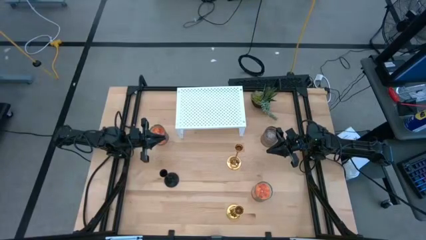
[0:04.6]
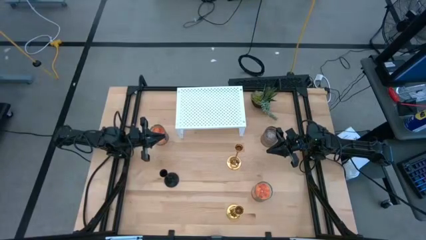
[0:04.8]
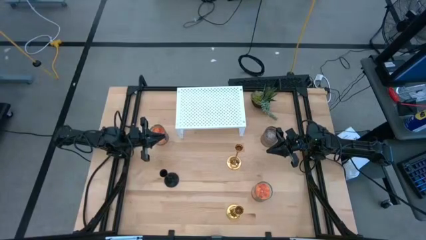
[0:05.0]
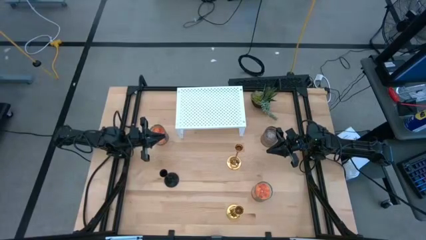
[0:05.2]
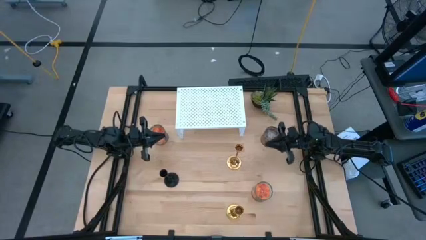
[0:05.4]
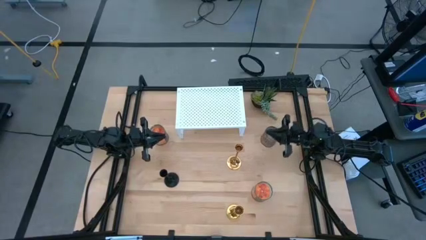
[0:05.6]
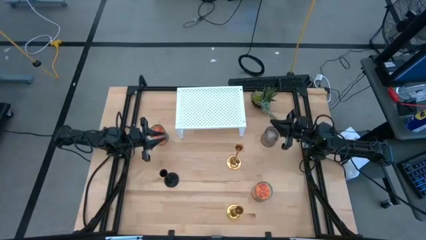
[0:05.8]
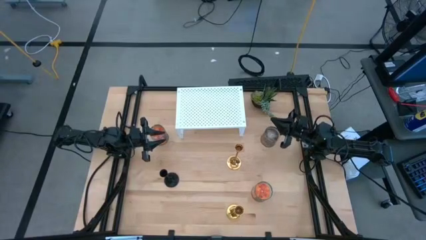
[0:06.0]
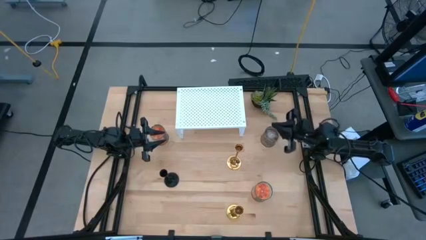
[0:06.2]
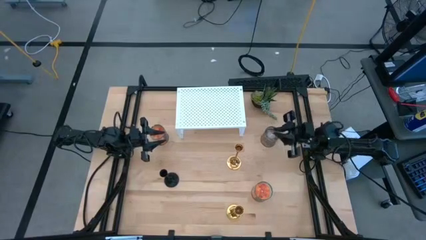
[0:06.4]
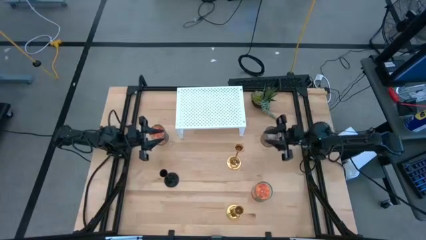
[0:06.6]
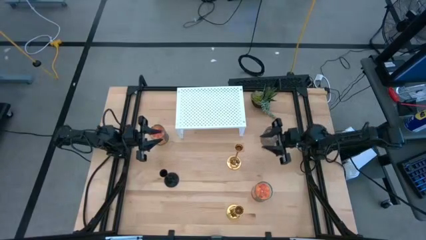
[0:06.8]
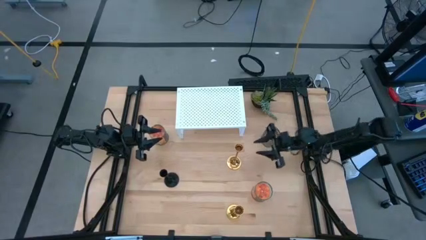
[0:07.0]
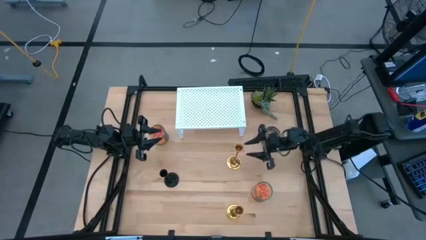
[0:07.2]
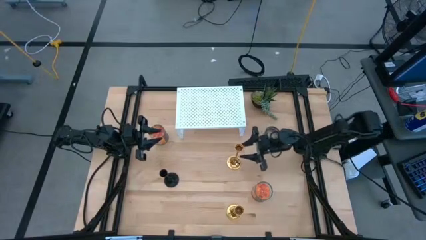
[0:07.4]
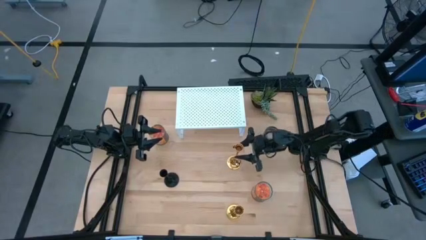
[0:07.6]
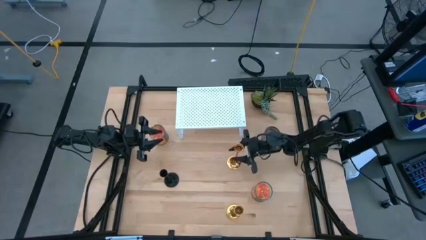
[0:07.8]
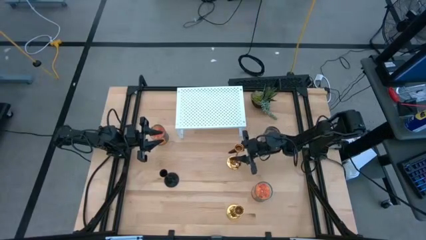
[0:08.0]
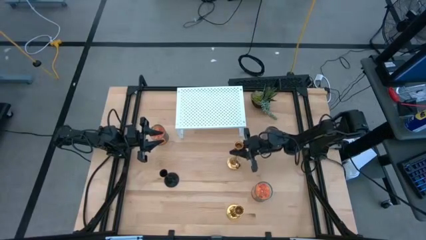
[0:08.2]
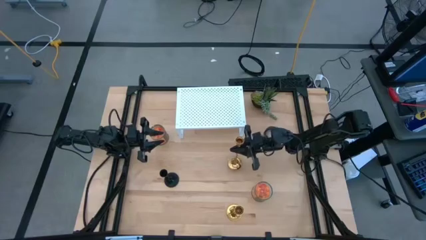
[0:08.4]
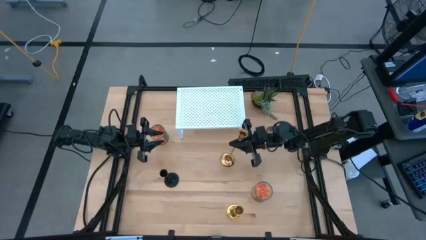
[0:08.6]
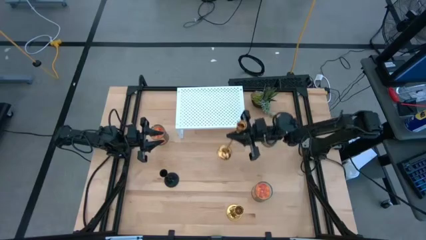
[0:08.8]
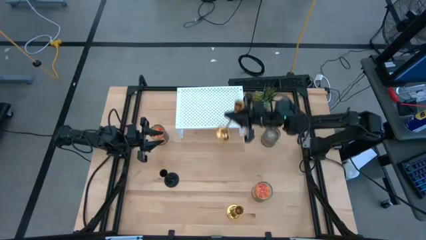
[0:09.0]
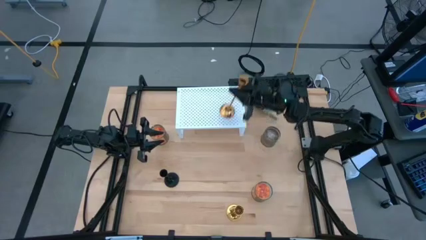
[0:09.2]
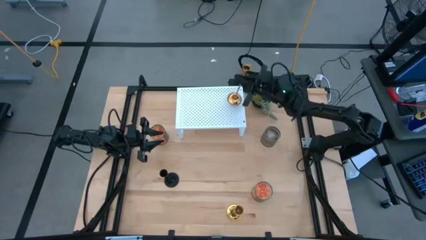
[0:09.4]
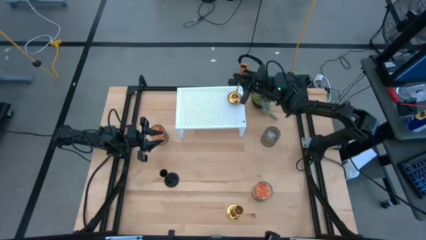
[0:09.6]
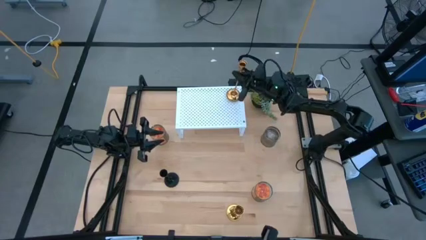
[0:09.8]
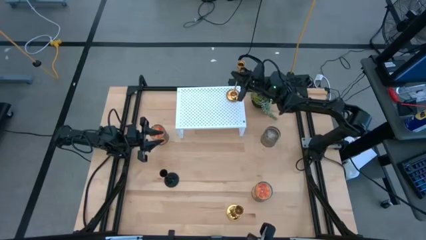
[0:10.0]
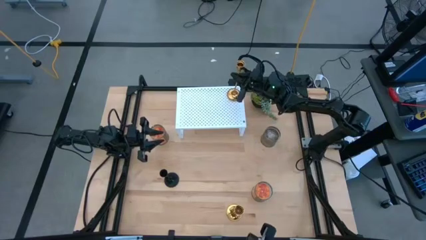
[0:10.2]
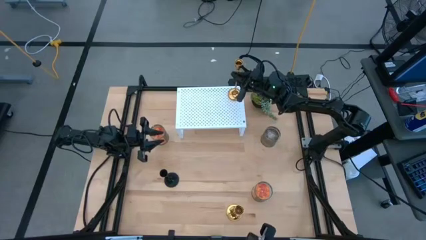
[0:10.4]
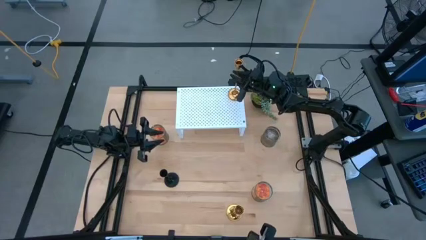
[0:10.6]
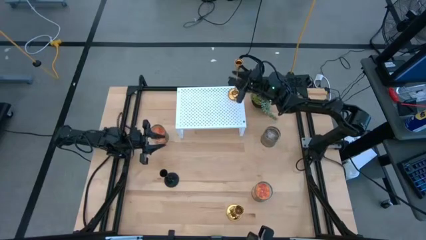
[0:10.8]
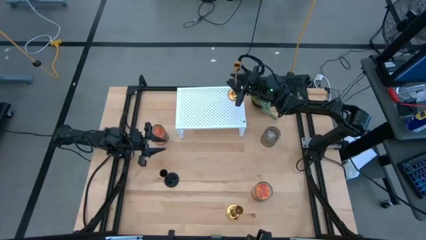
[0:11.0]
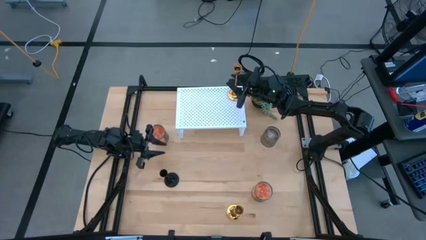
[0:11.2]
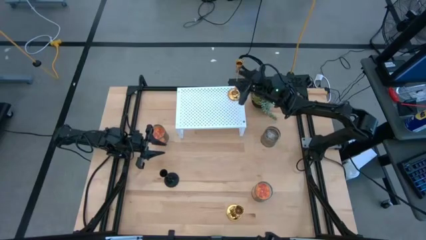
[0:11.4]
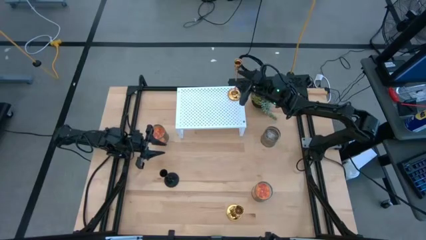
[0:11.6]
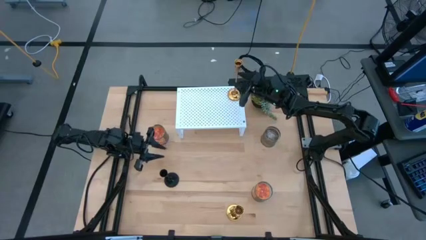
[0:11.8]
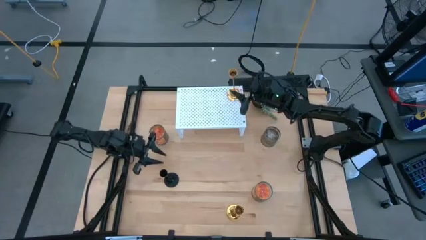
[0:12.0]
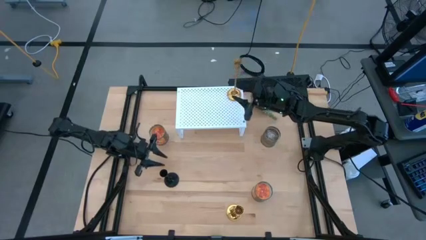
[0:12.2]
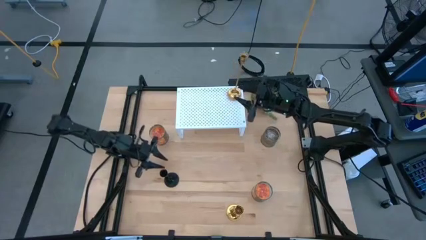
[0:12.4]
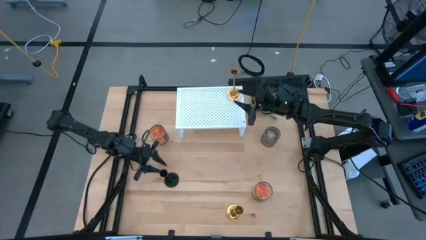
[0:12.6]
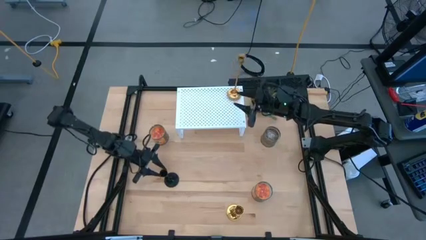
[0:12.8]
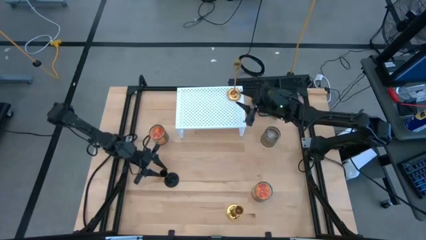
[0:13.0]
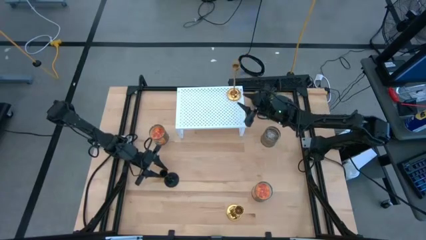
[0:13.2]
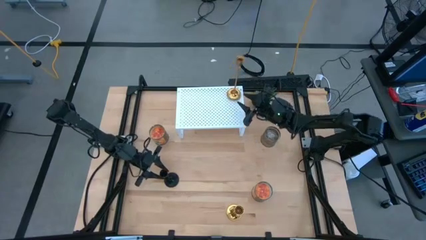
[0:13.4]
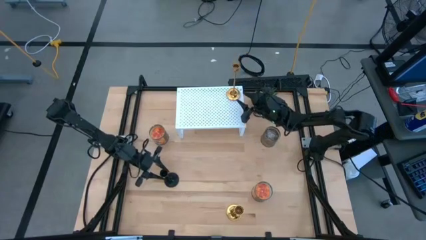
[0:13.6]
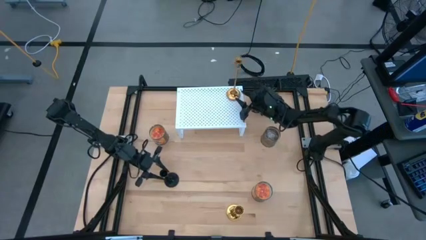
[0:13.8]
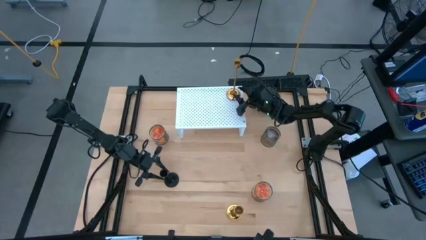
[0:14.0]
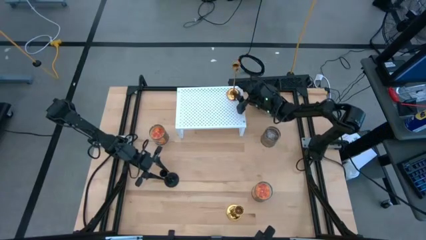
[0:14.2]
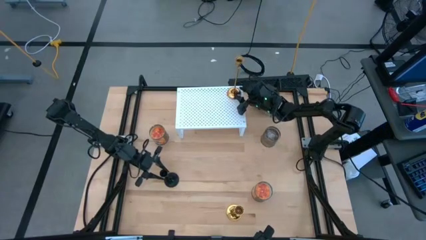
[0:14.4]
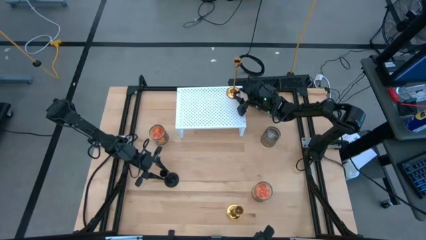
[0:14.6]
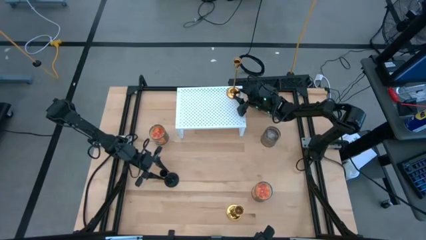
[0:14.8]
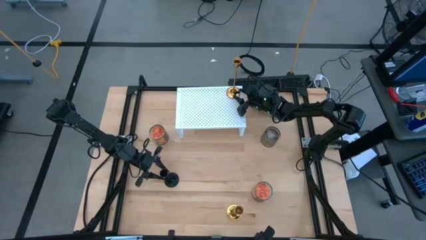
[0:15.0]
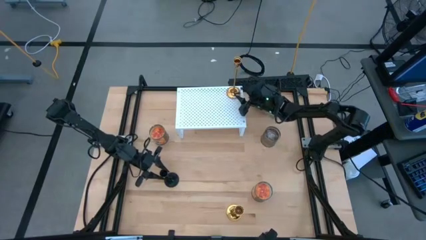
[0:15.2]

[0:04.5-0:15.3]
Task: Pick & Place candle stick holders
Put the top gold candle holder on the shelf

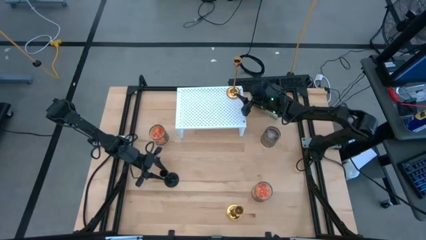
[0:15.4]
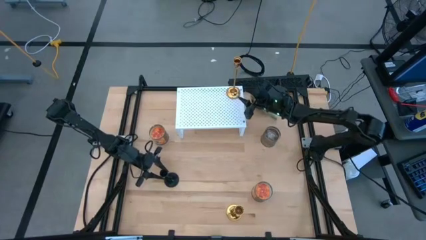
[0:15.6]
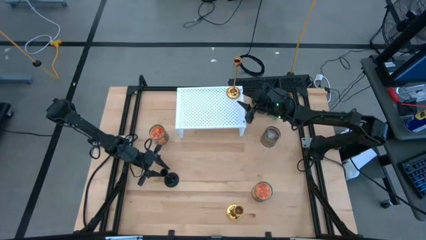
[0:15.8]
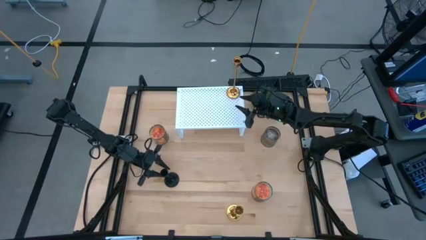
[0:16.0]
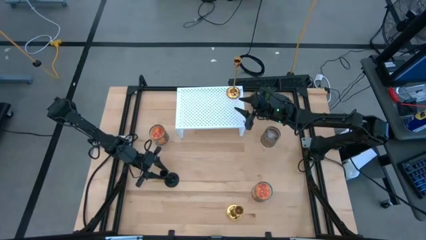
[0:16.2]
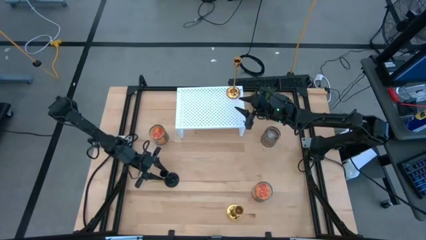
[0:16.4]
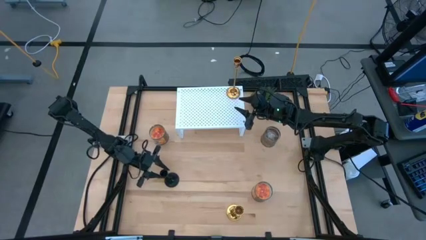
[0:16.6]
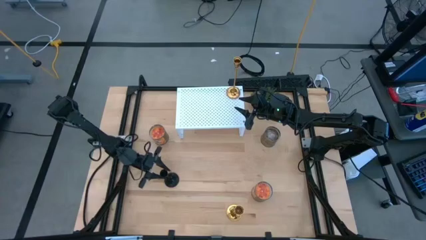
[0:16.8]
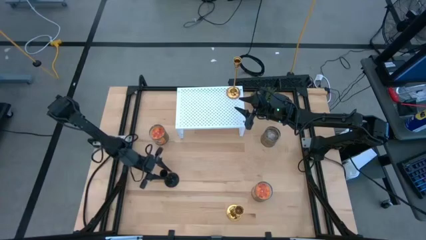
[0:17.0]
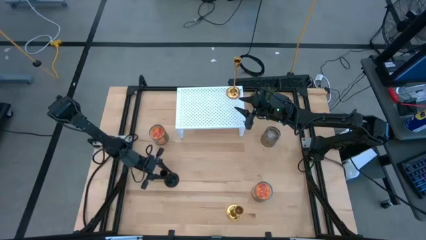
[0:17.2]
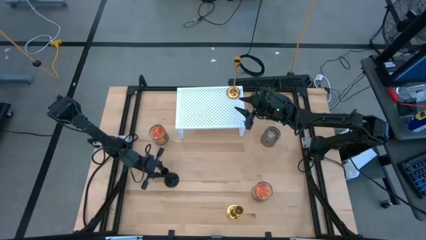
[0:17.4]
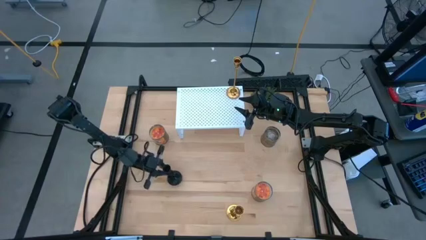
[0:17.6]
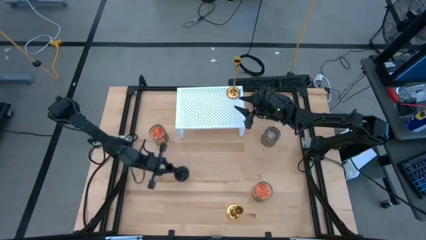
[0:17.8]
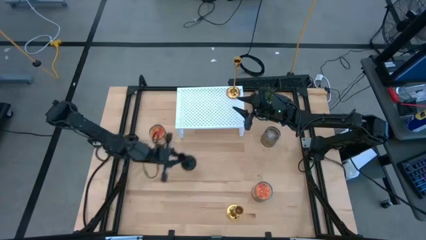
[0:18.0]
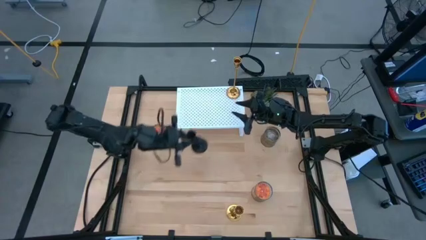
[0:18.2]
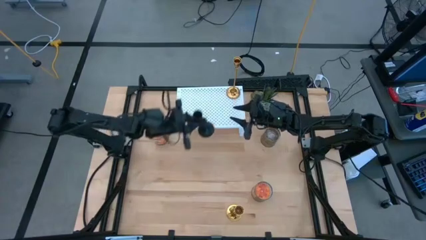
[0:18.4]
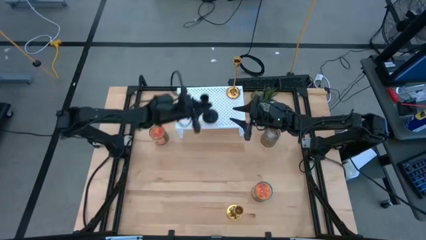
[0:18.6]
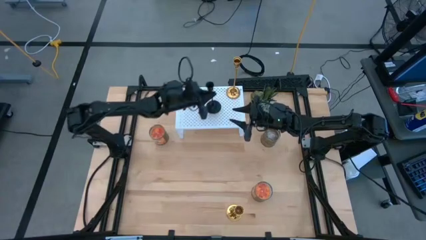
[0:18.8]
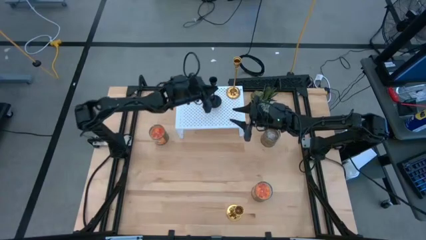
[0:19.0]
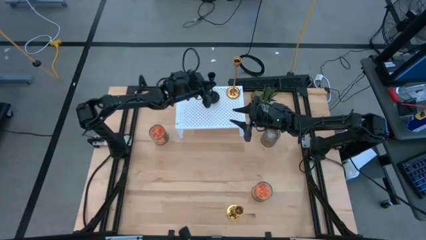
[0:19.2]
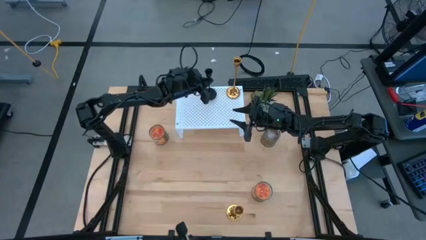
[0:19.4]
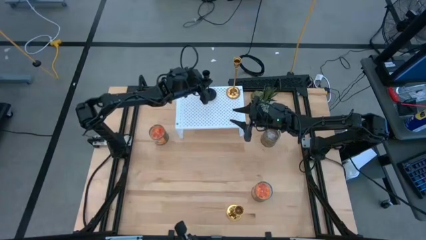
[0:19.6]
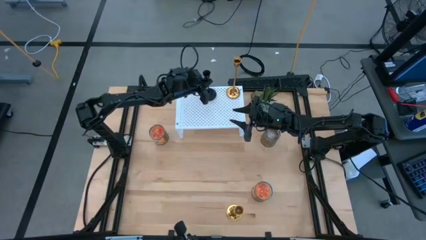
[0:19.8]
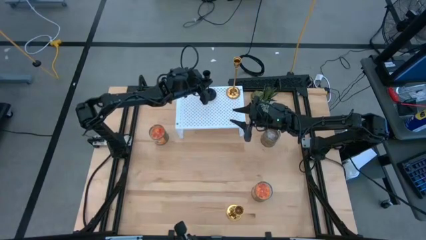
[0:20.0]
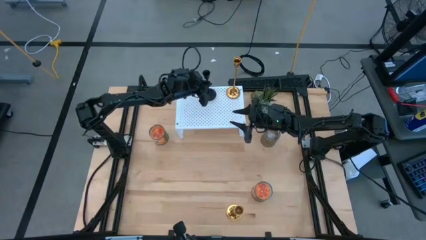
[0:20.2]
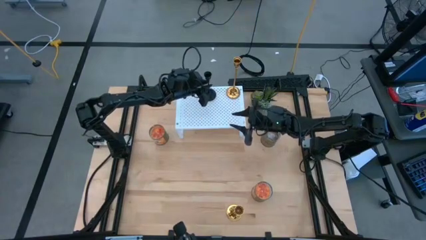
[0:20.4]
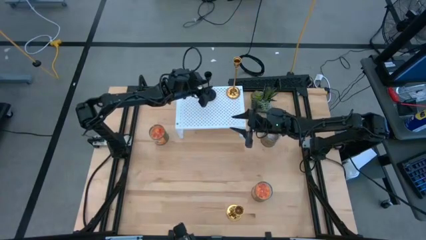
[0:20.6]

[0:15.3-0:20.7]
Put the black candle holder on the shelf
